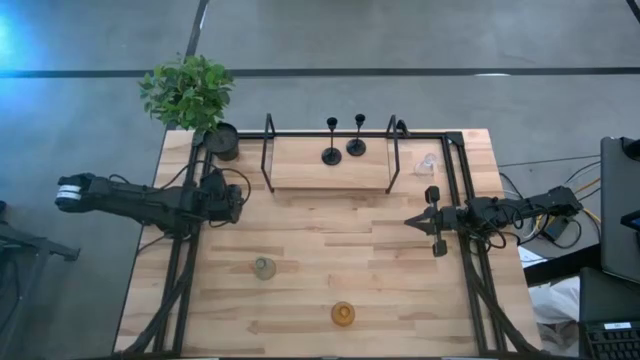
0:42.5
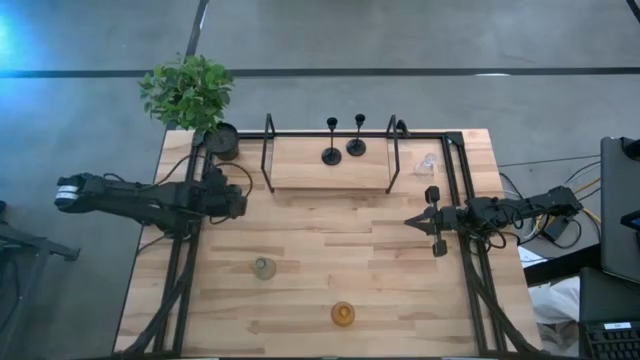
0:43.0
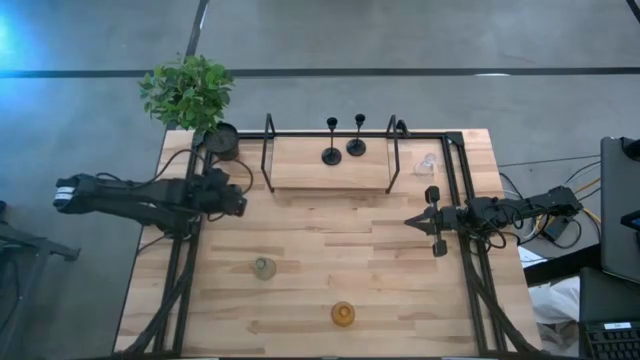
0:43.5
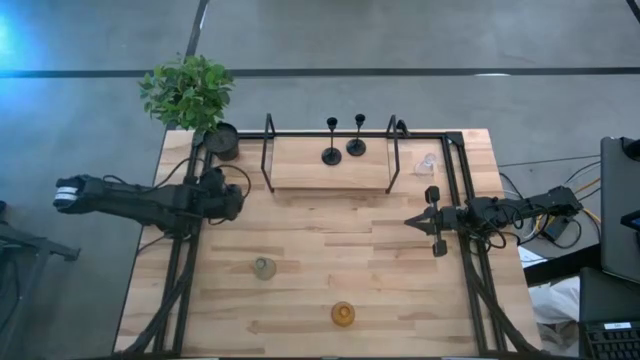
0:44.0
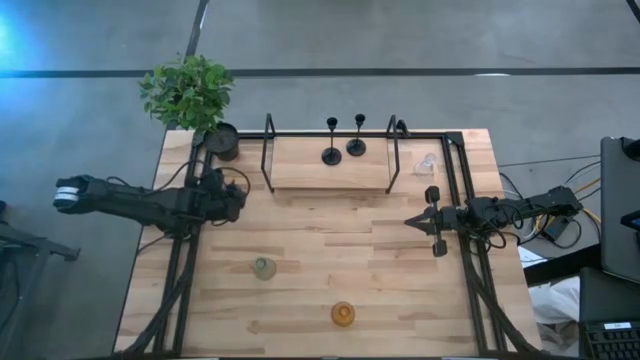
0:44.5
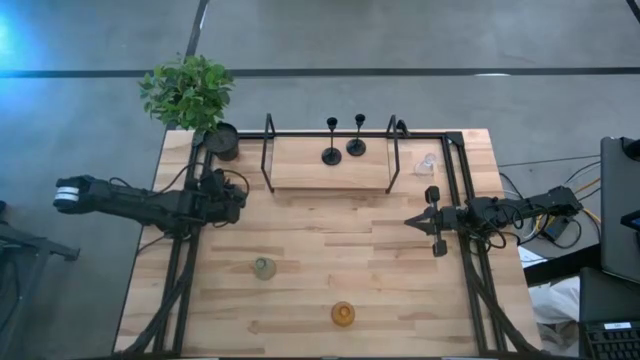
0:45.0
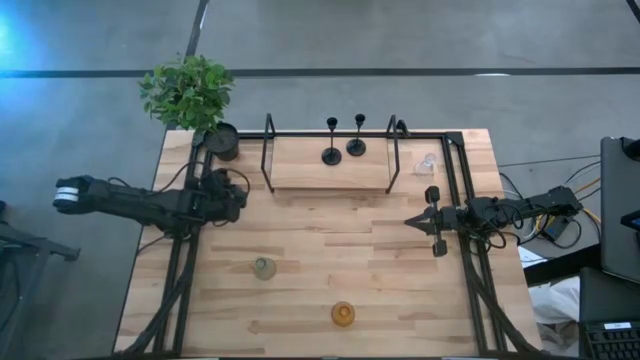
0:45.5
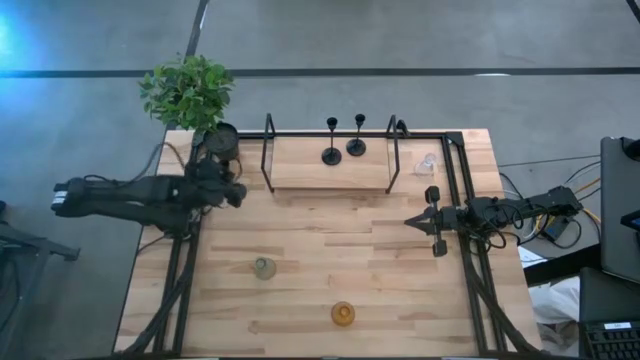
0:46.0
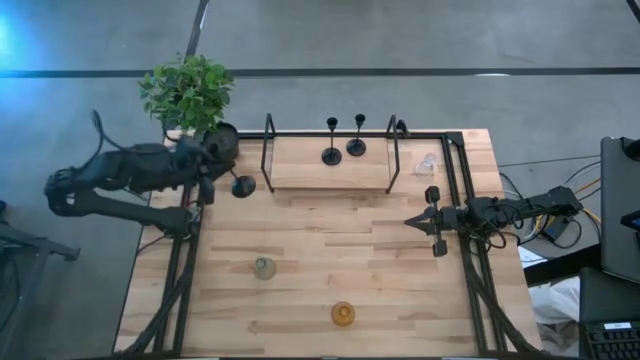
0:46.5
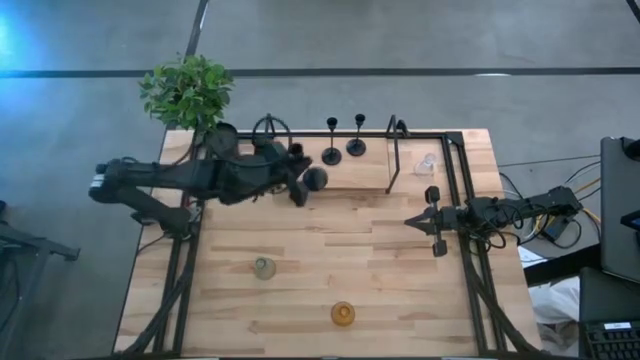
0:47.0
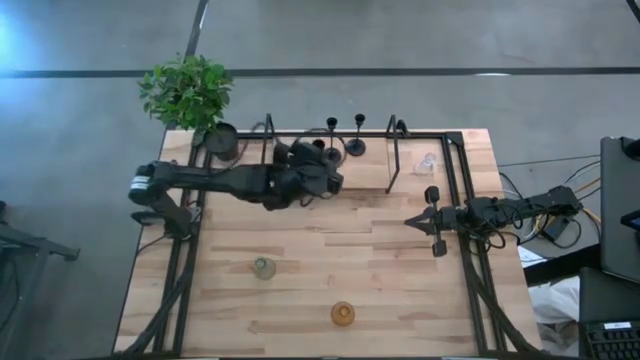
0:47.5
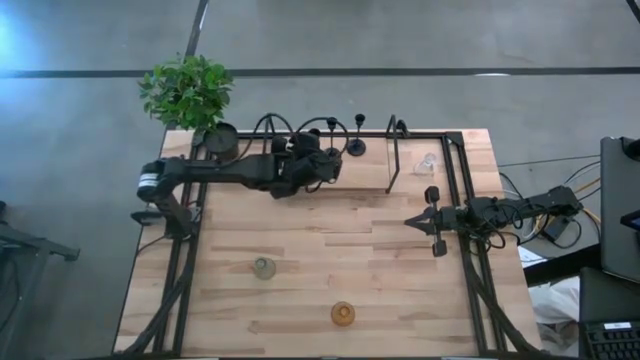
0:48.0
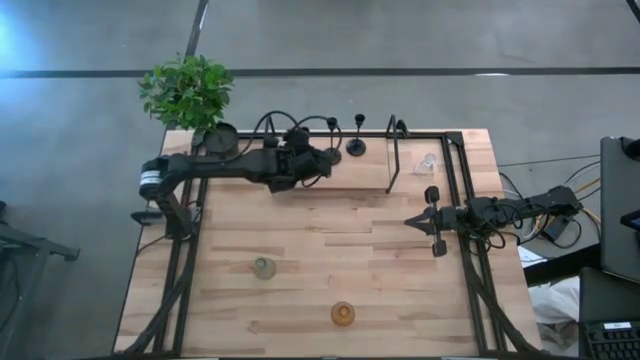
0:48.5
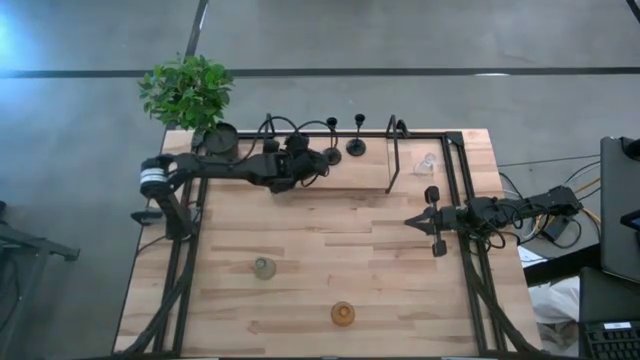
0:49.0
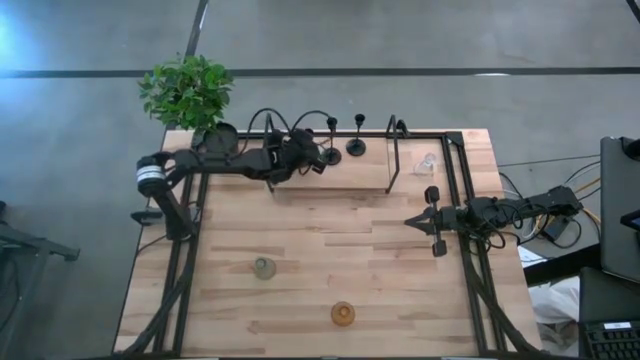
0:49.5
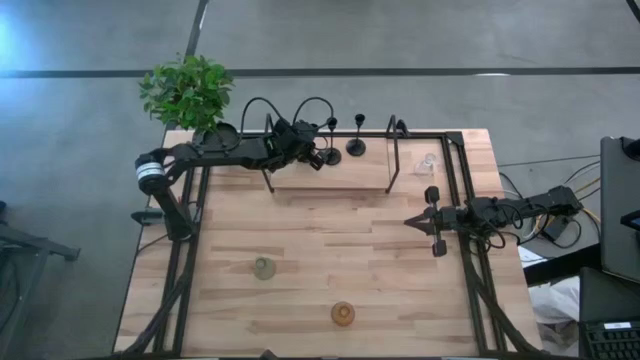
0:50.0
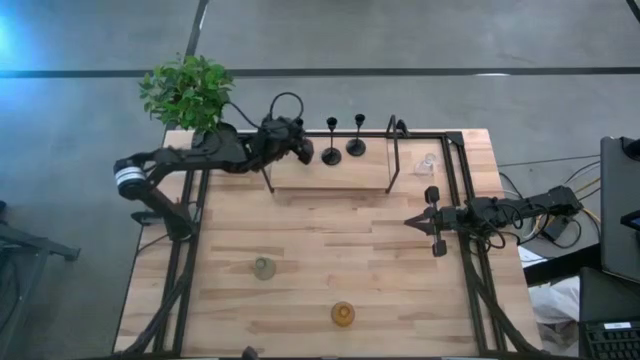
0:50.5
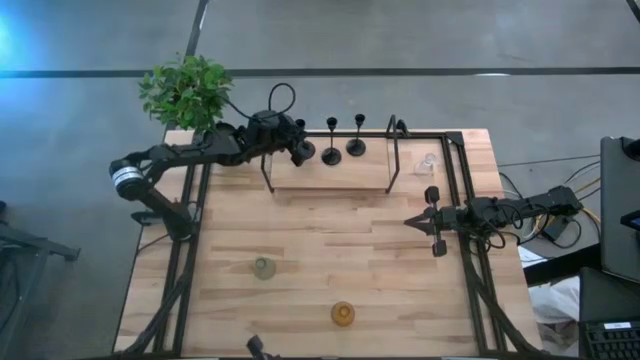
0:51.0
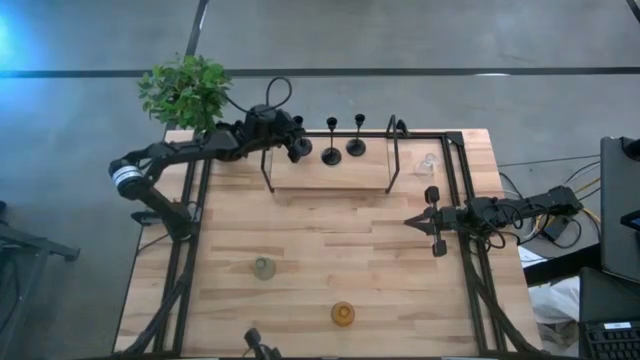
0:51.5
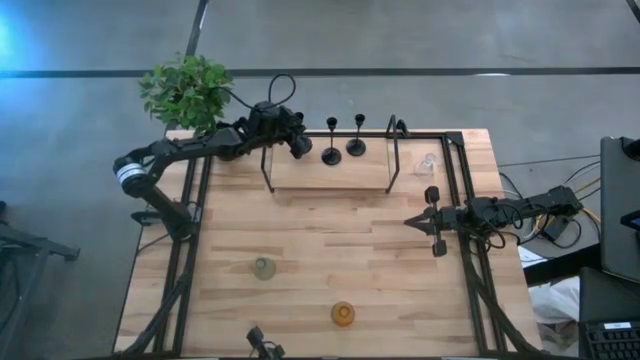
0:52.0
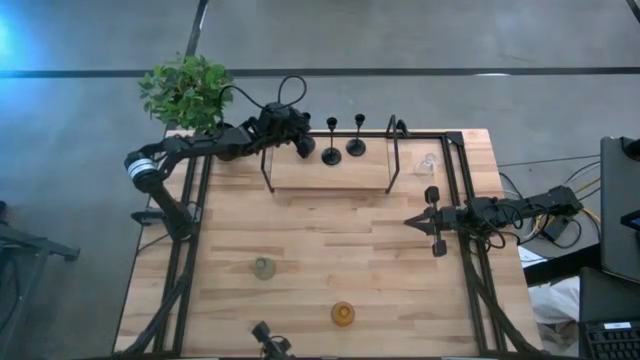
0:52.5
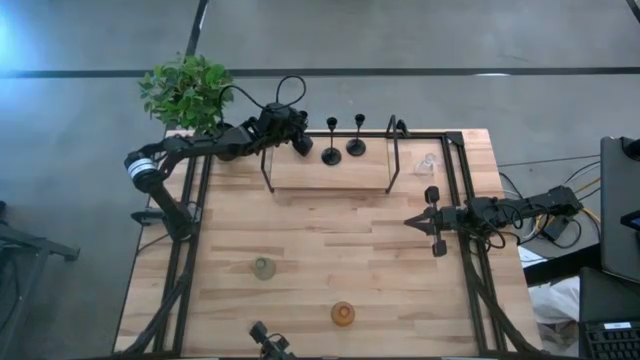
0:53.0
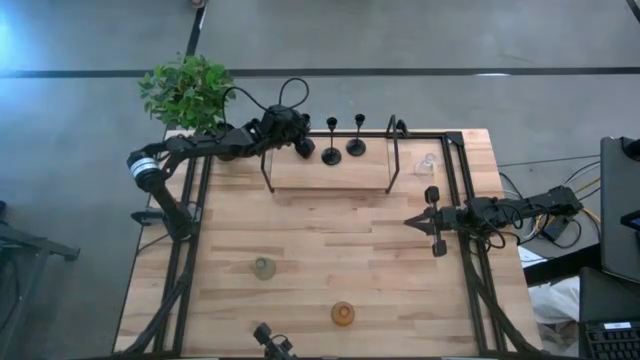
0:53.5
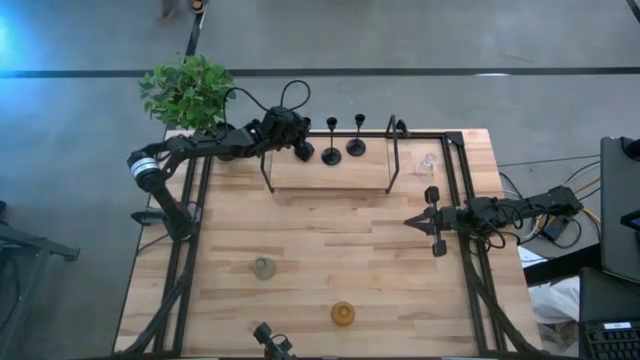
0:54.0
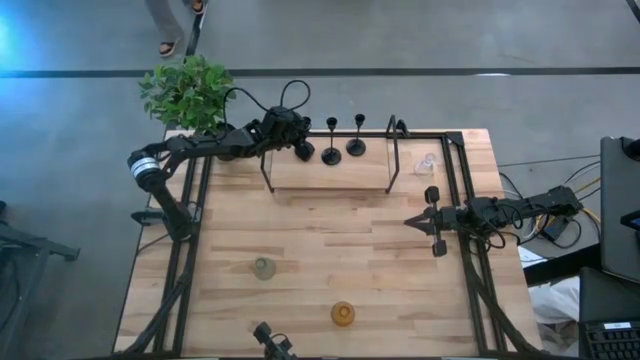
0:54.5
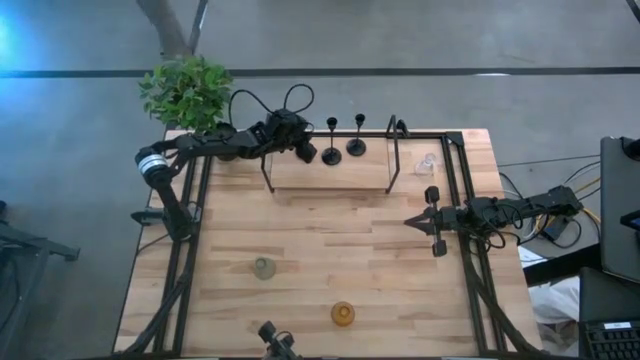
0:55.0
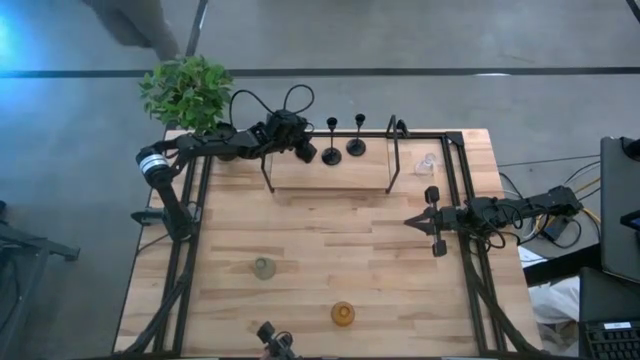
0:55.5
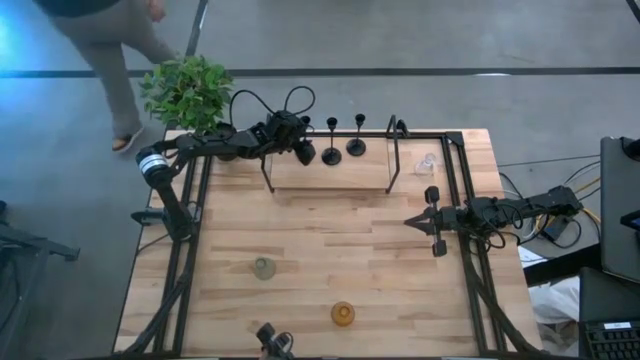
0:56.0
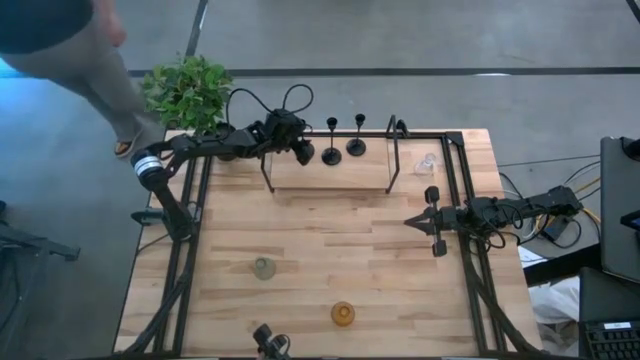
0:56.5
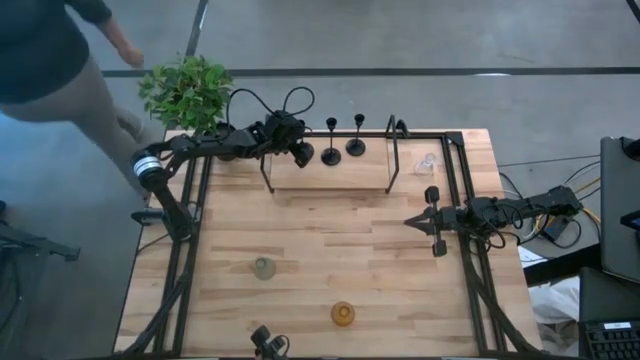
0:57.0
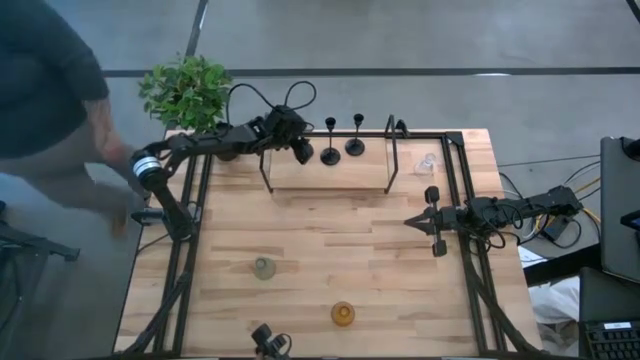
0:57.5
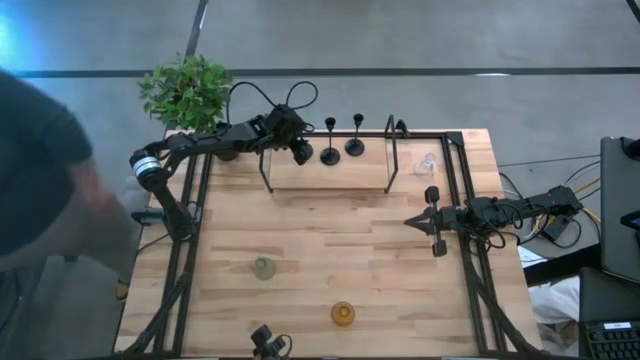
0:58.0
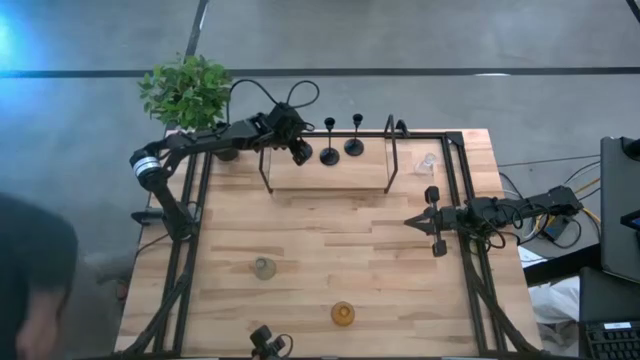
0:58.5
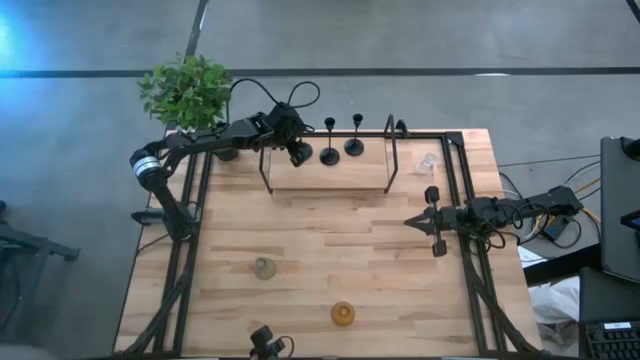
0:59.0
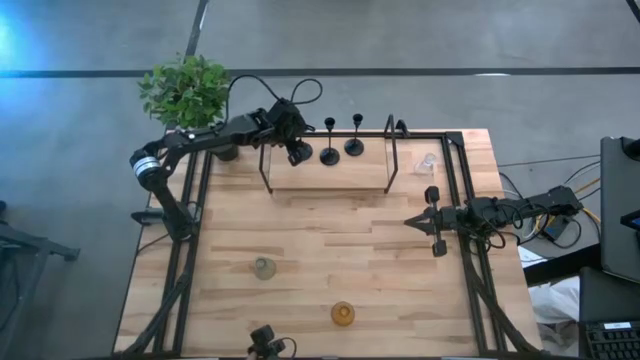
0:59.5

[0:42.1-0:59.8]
Task: Pick & Place candle stick holders
Put the black candle holder on the shelf aligned with the other black candle holders

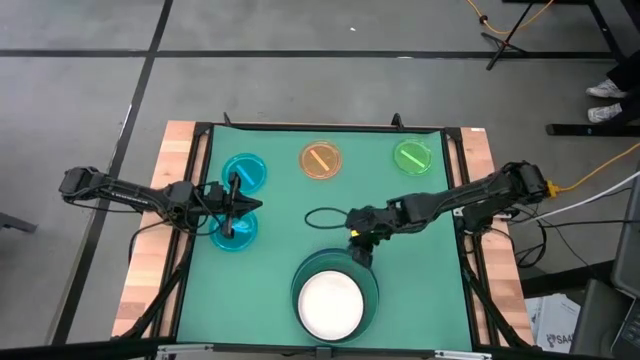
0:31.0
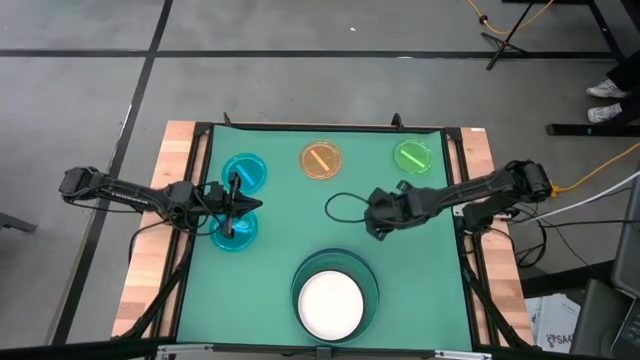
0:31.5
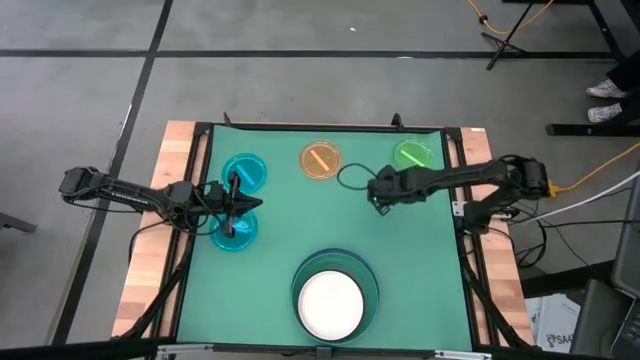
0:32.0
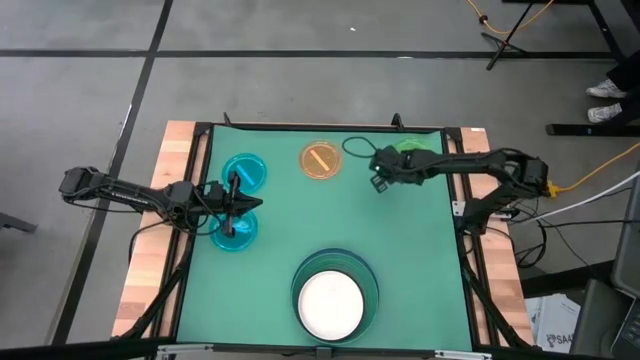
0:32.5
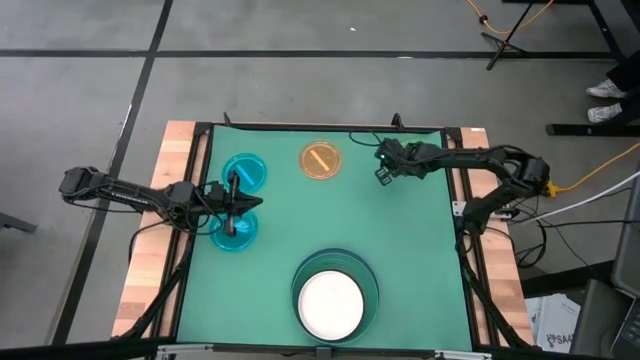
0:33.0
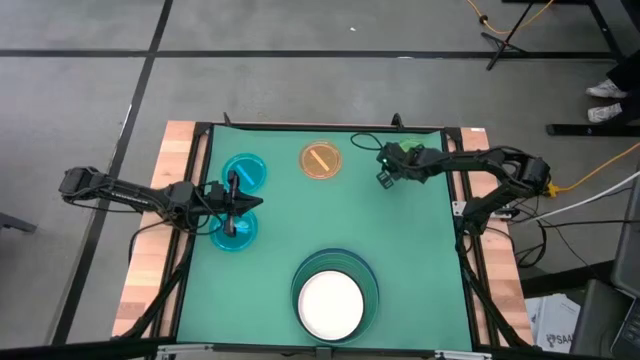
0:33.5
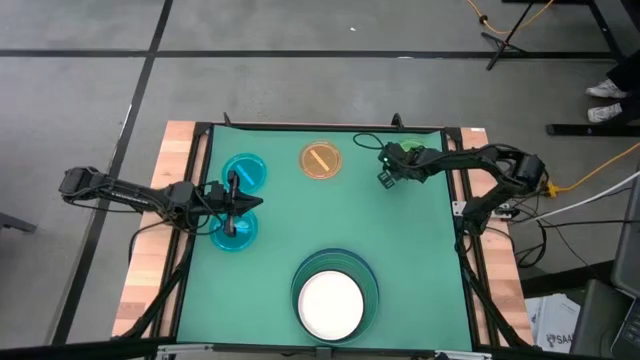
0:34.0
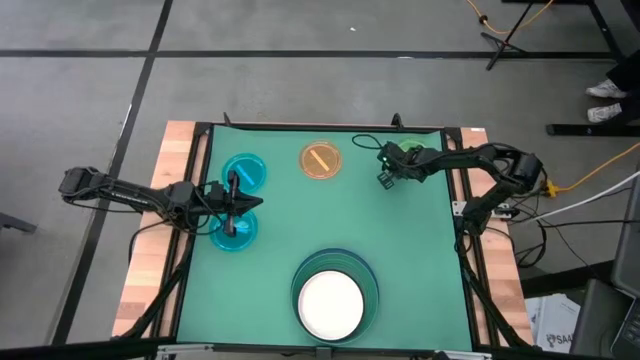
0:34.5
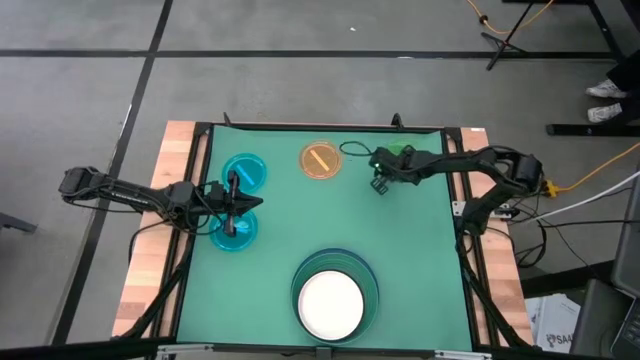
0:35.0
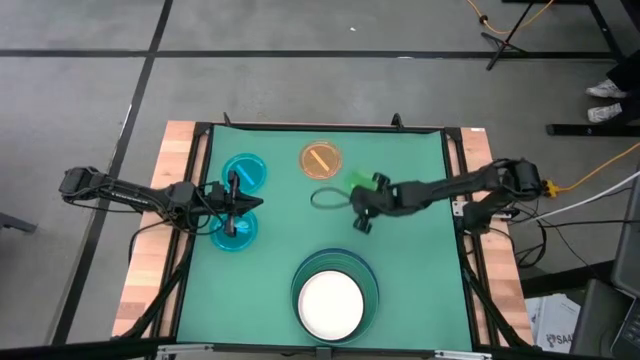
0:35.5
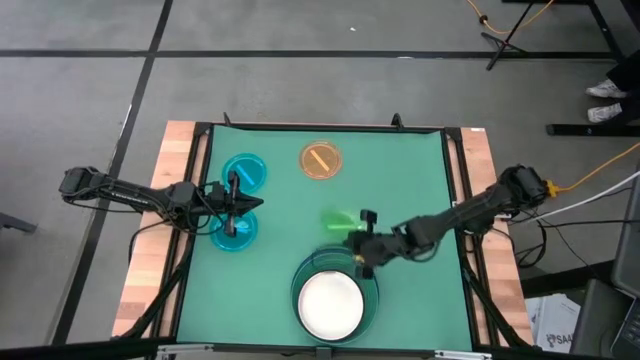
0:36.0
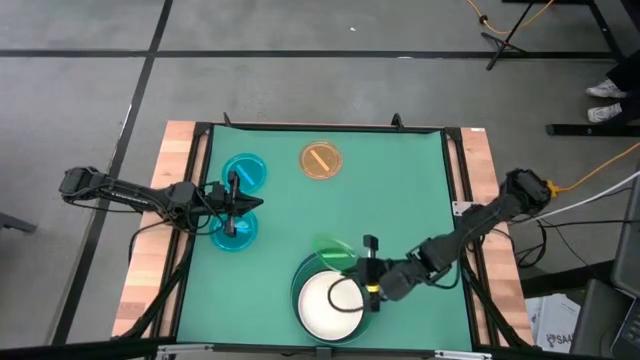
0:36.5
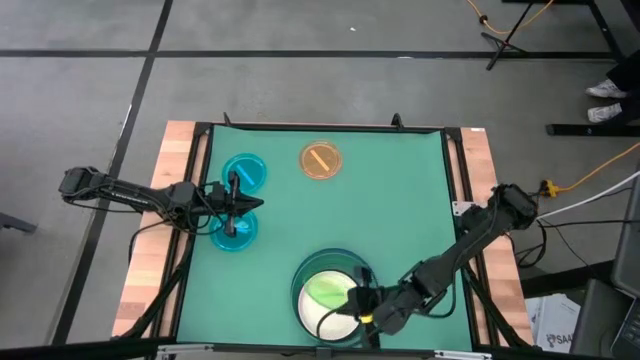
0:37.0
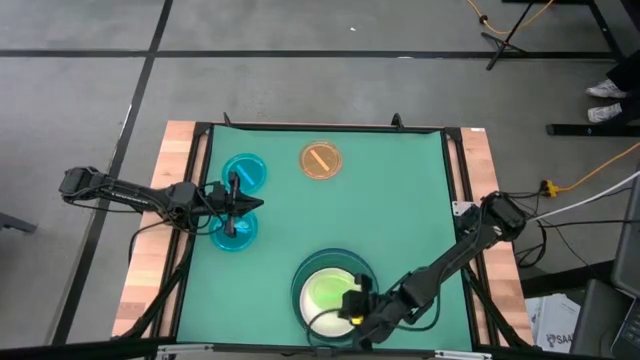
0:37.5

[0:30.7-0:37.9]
Task: Stack plastic plates
Stack the green plate on top of the white plate
